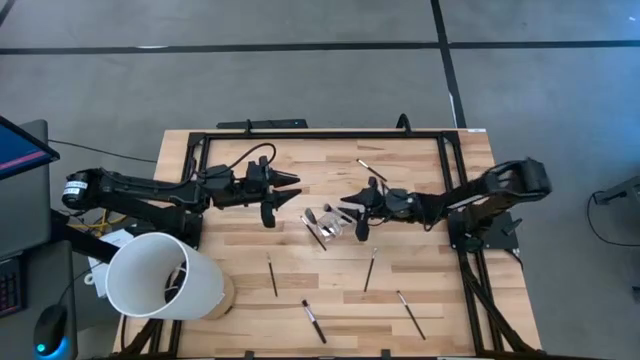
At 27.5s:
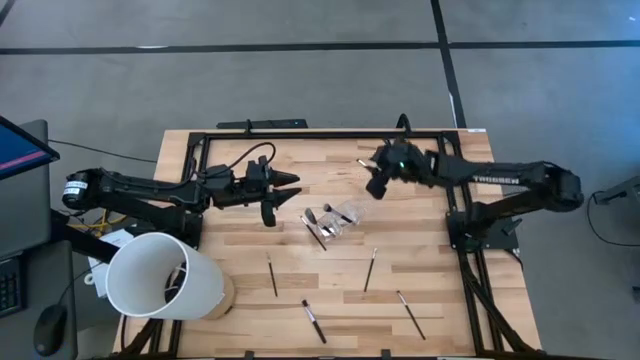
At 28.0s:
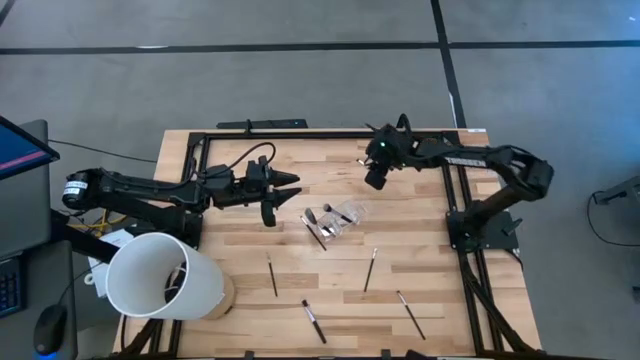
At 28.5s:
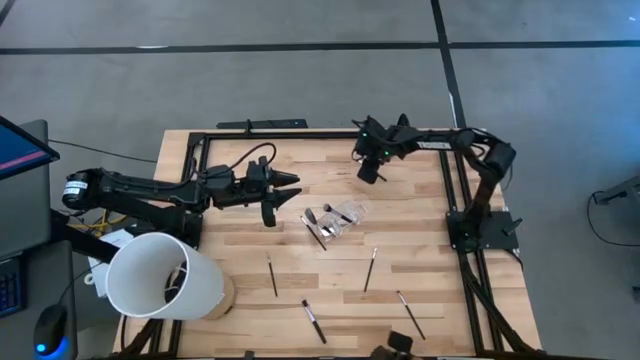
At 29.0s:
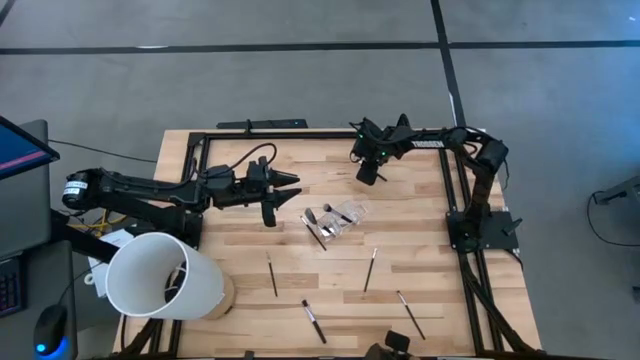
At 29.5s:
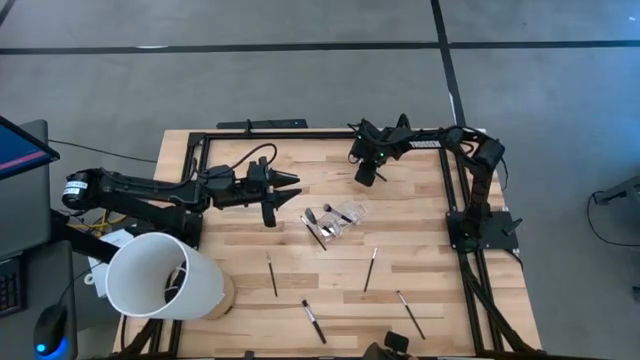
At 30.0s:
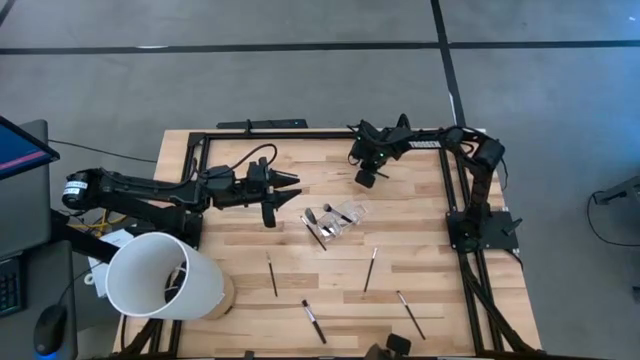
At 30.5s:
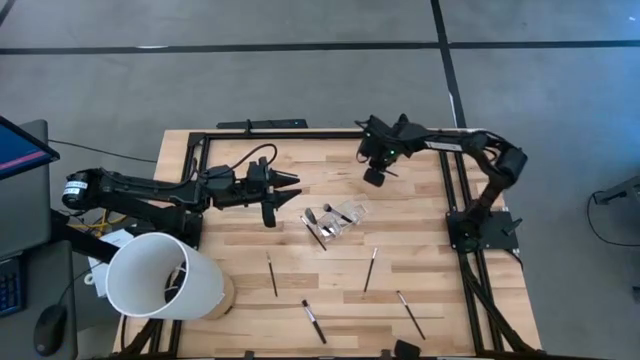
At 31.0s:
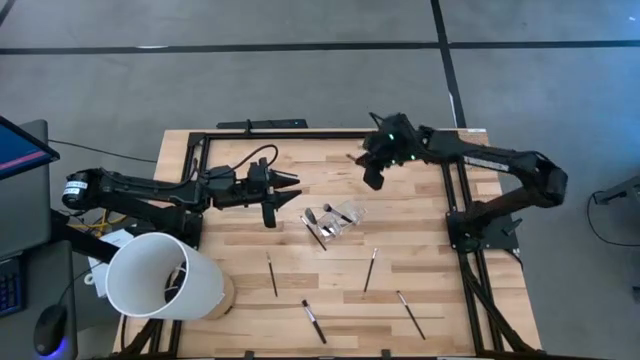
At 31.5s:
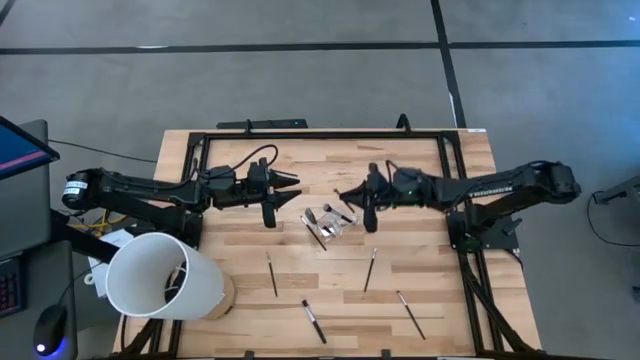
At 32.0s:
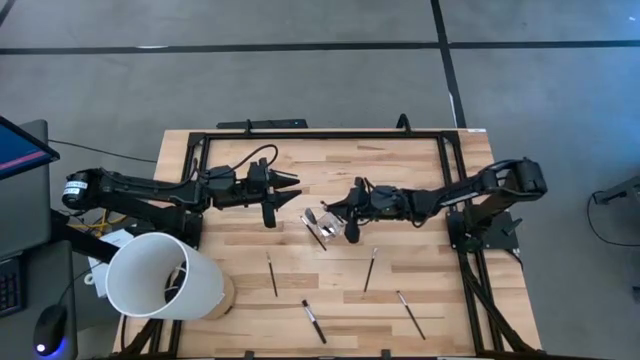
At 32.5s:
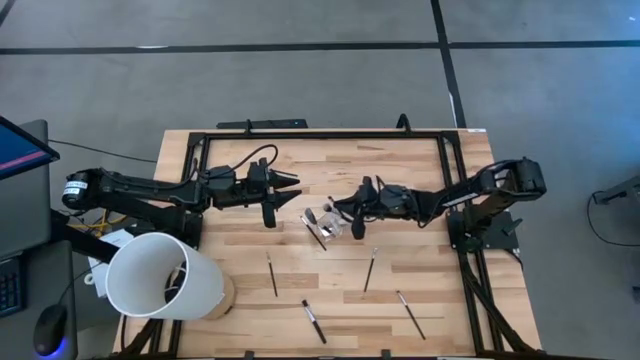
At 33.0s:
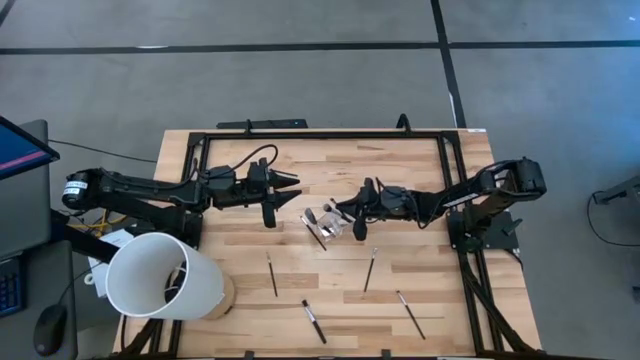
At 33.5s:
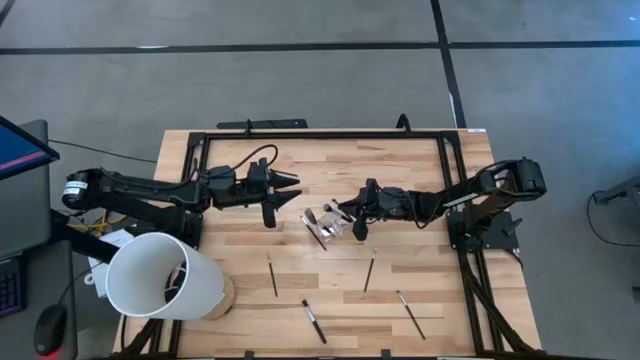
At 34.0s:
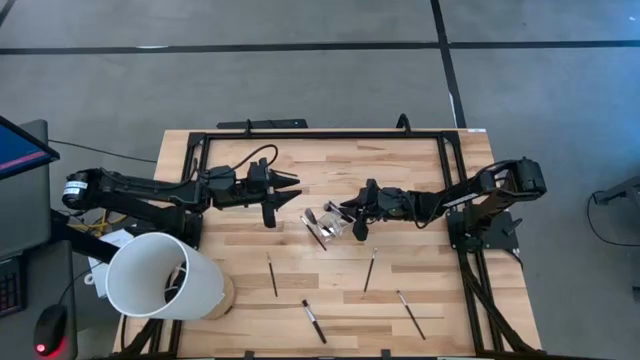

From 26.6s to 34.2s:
Task: Put items in baskets/containers
Put the top black foundation brush into the transparent organizer

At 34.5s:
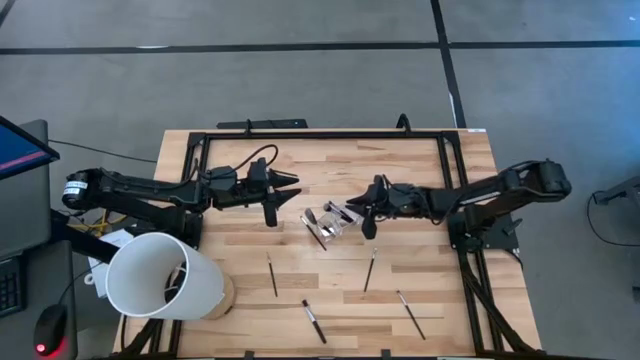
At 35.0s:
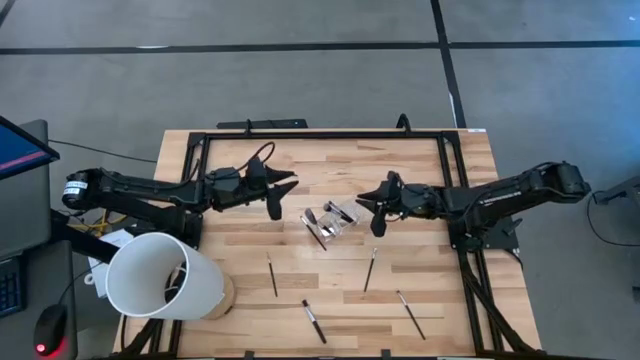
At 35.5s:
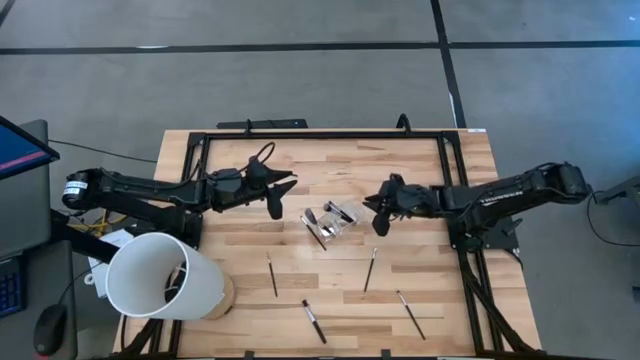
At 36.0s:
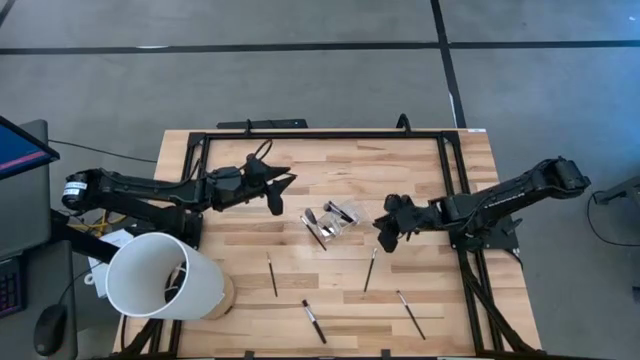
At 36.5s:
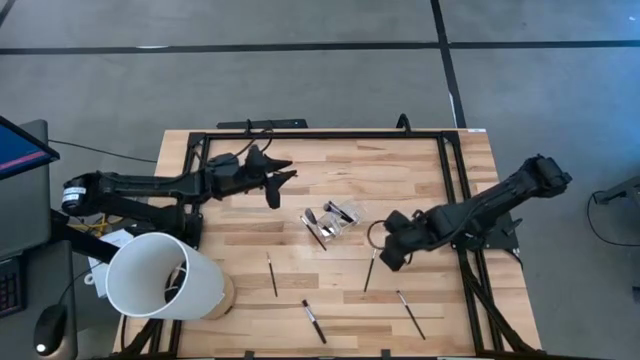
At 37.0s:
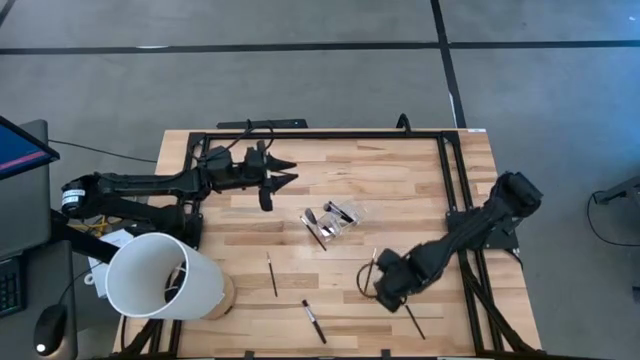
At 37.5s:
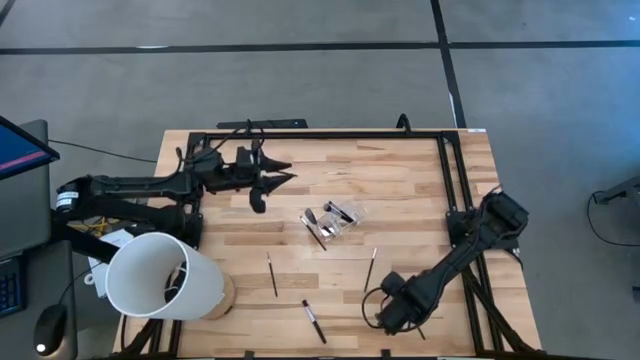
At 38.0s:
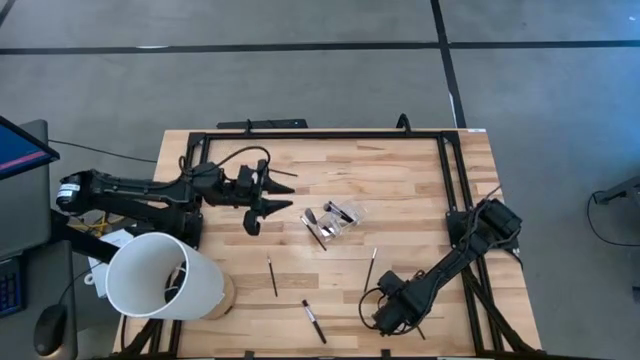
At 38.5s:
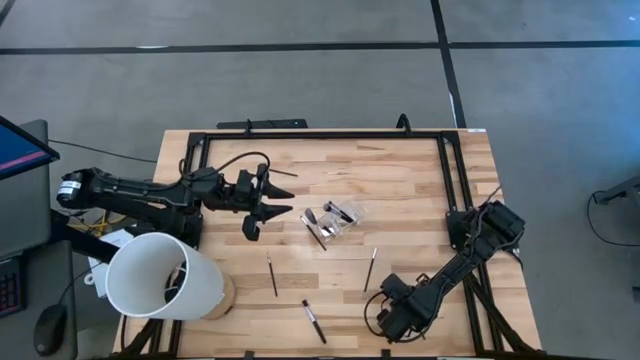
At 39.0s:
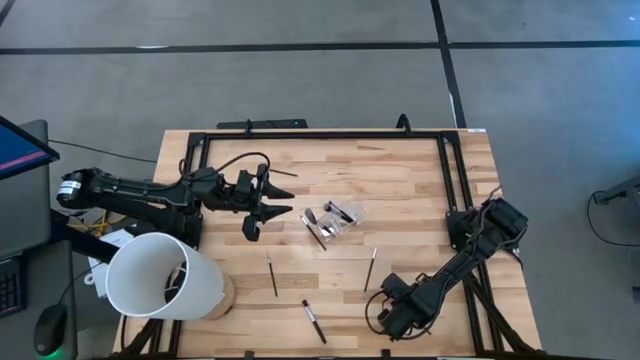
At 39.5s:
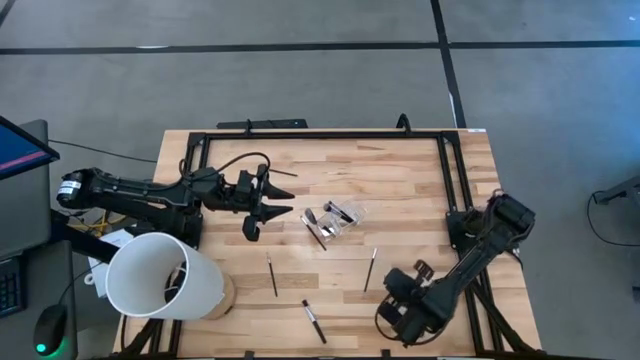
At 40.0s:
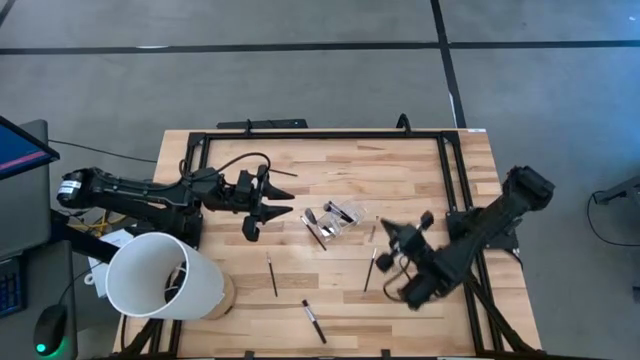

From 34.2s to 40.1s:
Put the black foundation brush into the transparent organizer

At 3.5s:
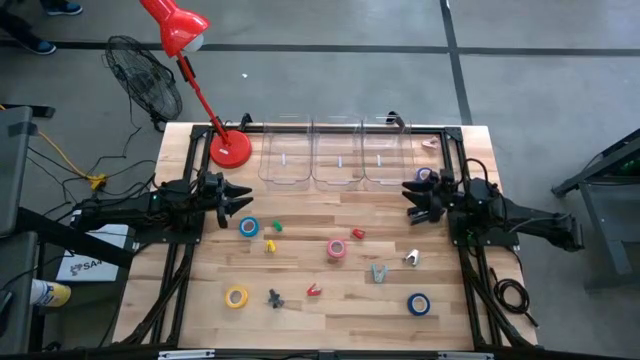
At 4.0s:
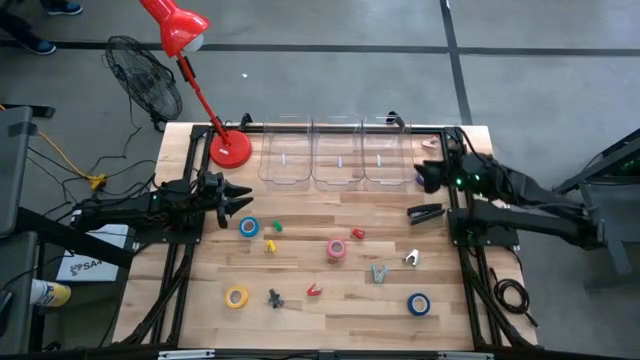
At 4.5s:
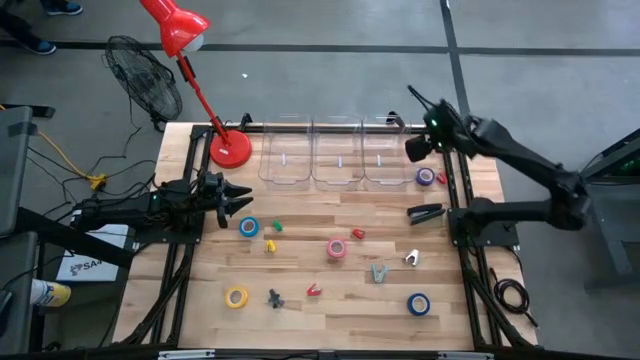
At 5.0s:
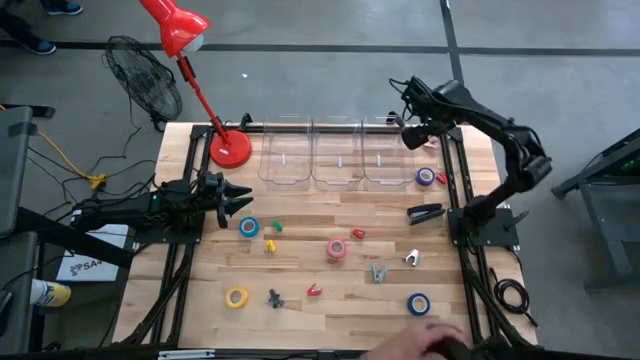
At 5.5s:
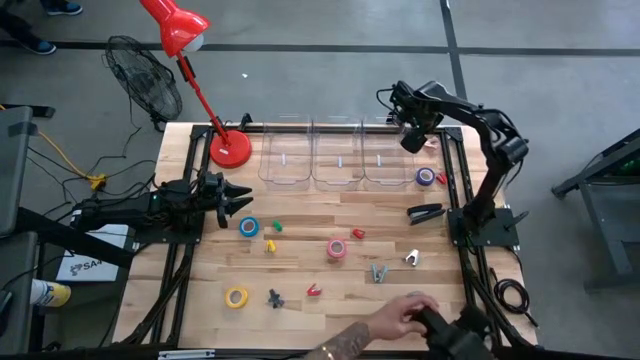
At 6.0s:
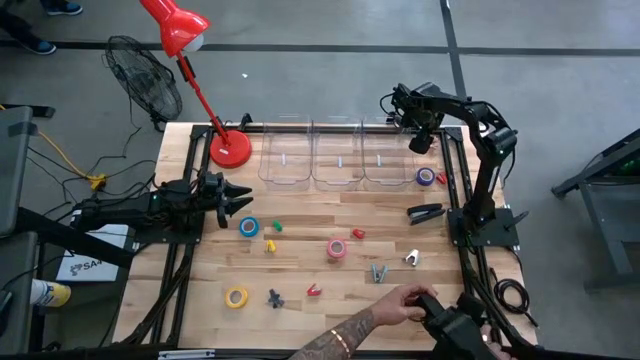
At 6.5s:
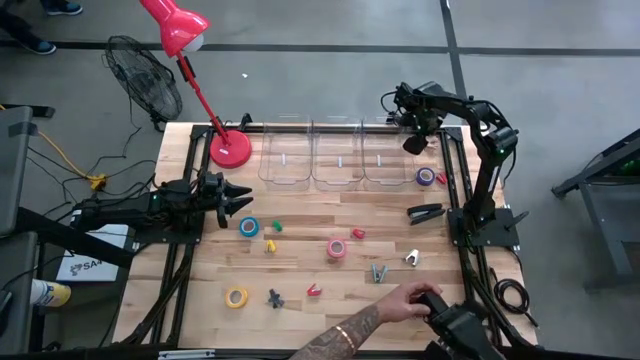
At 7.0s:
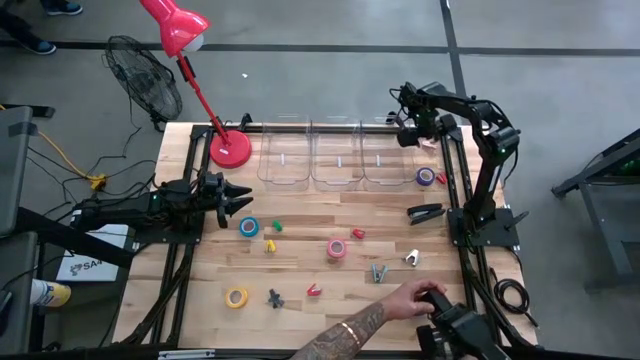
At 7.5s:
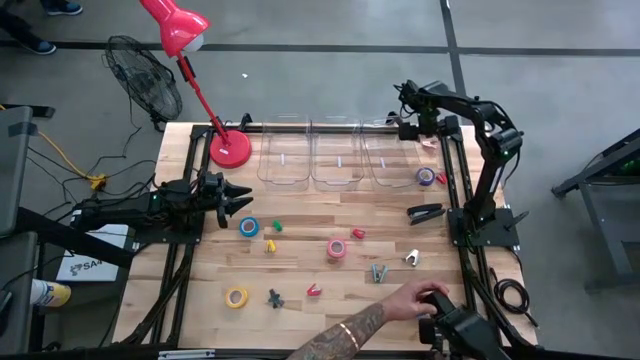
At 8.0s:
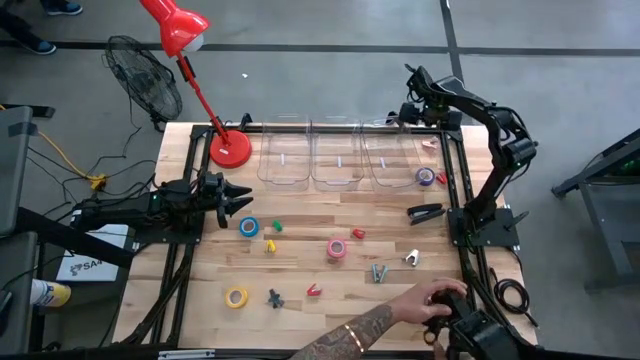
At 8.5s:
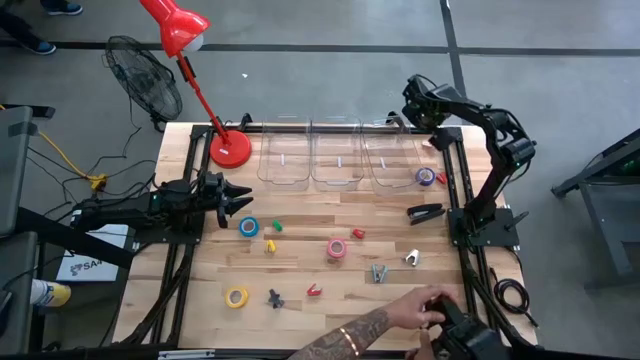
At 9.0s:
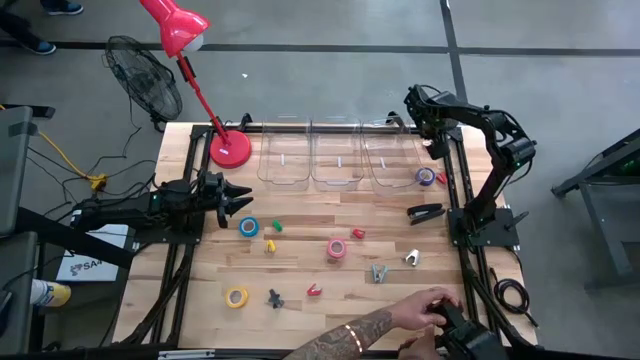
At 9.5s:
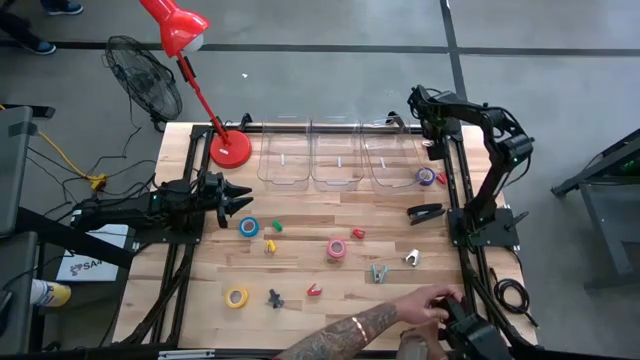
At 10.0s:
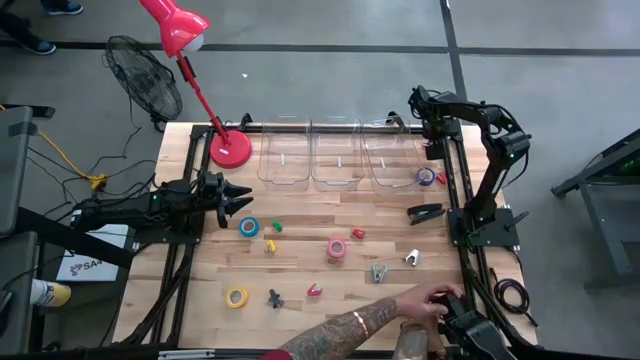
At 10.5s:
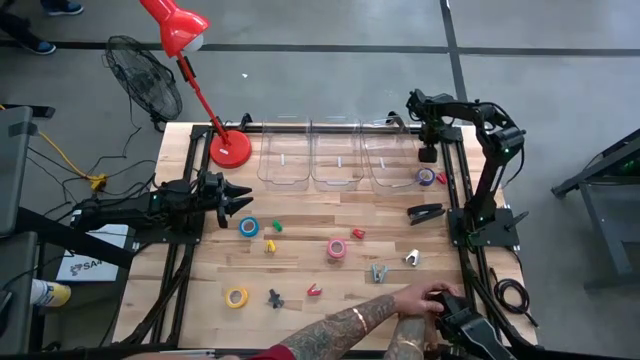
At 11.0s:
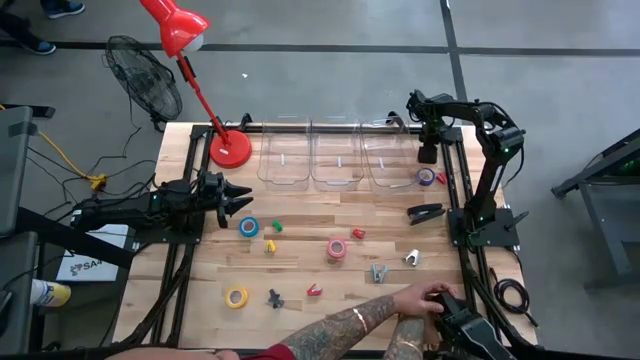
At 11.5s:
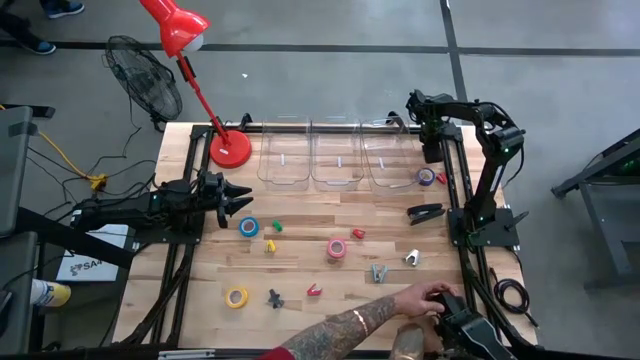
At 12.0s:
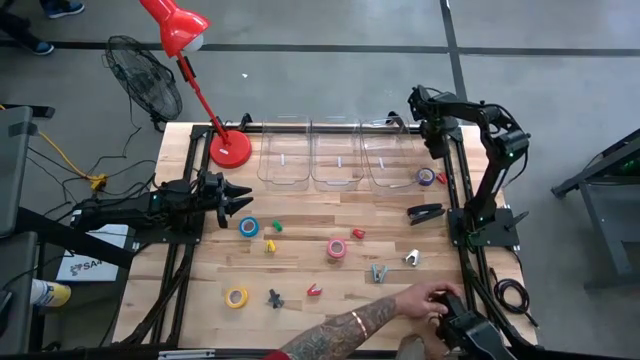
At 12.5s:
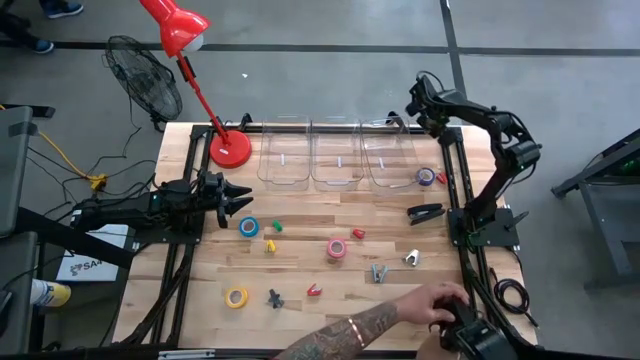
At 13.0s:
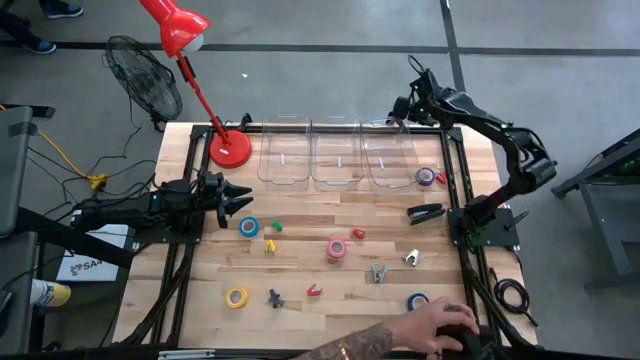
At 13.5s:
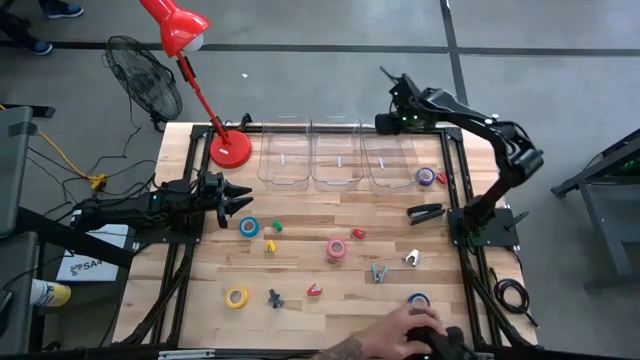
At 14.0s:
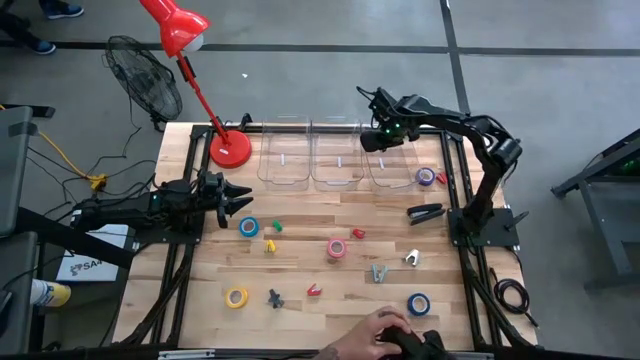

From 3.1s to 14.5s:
Task: Pick and place Stapler, Stapler remover, tape
Put the pink staple remover into the right transparent bin
